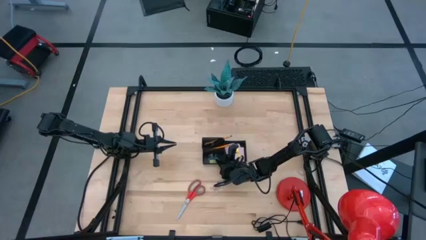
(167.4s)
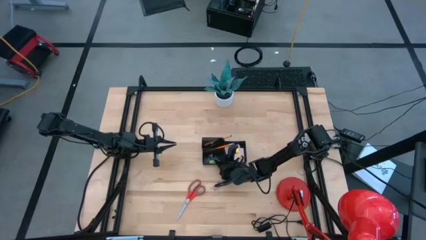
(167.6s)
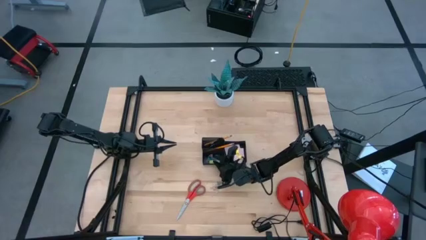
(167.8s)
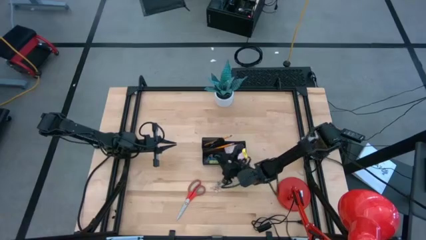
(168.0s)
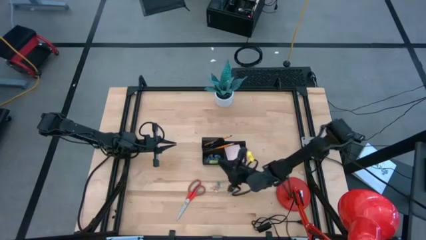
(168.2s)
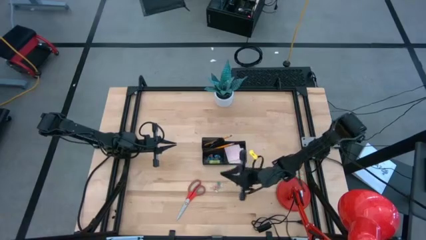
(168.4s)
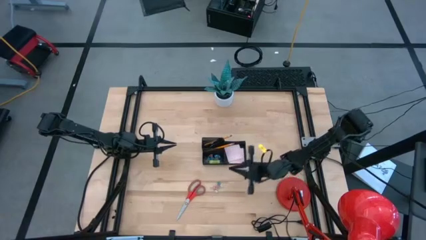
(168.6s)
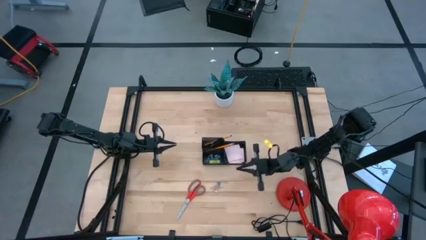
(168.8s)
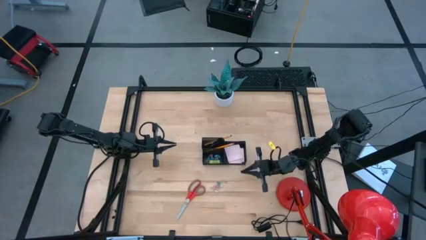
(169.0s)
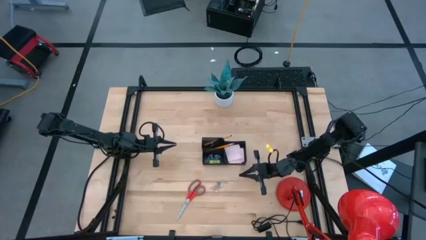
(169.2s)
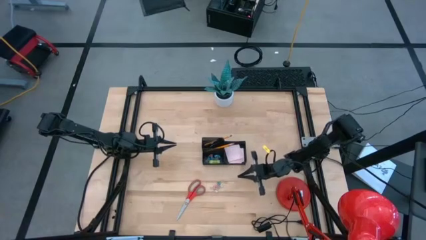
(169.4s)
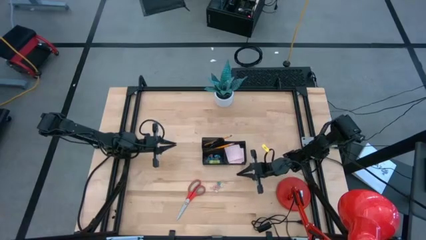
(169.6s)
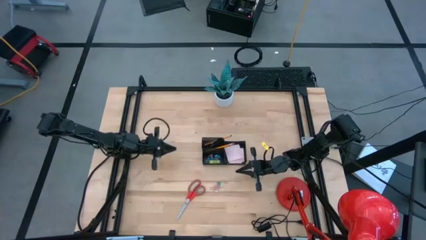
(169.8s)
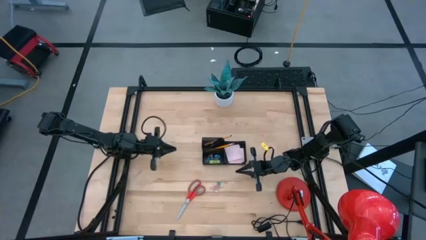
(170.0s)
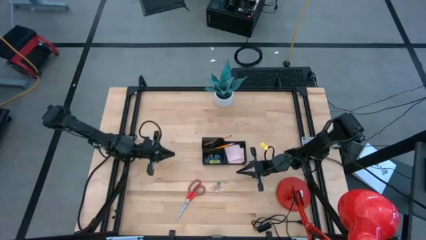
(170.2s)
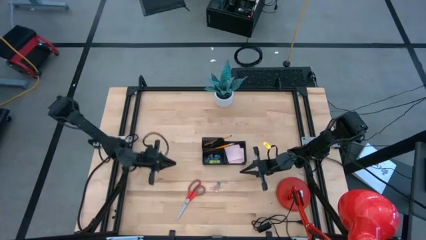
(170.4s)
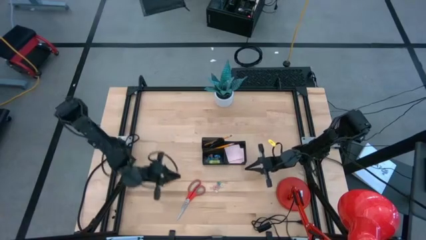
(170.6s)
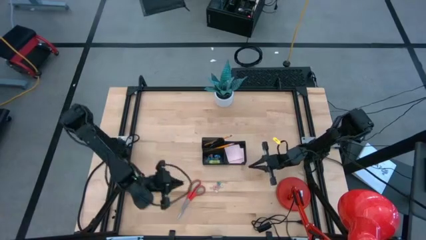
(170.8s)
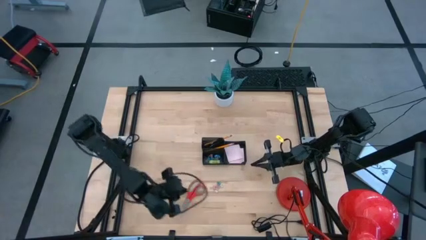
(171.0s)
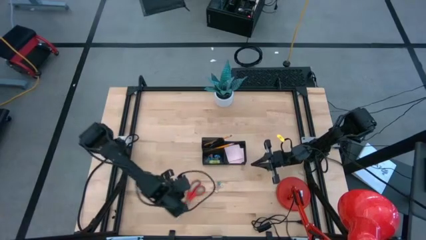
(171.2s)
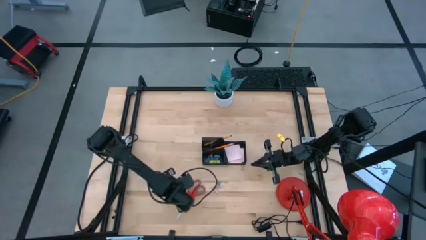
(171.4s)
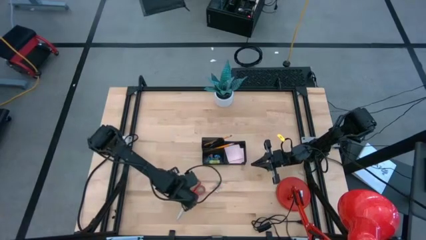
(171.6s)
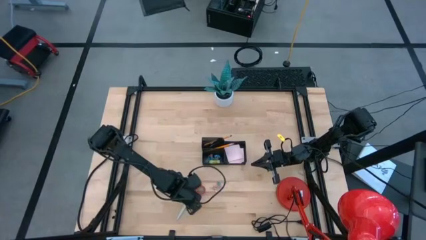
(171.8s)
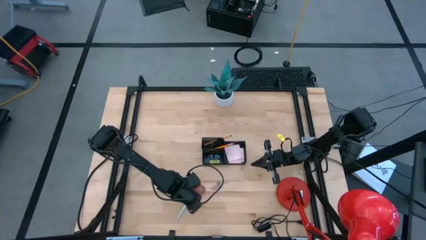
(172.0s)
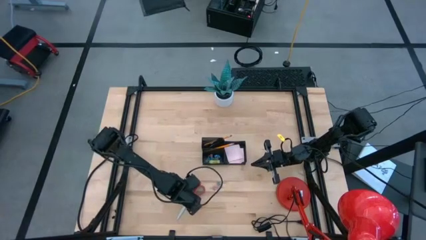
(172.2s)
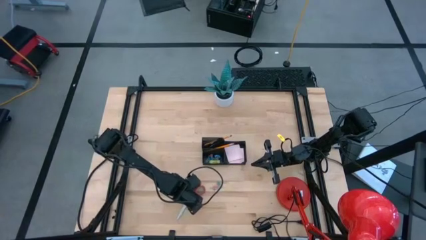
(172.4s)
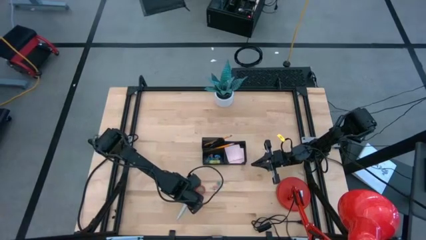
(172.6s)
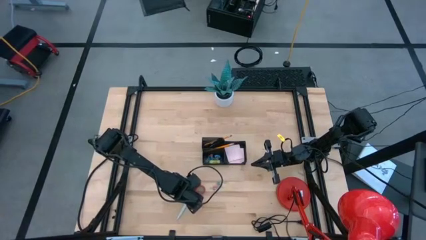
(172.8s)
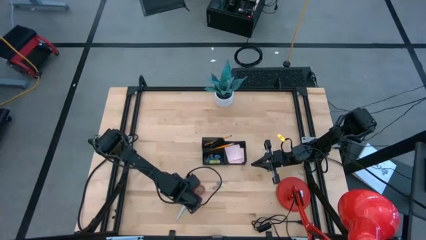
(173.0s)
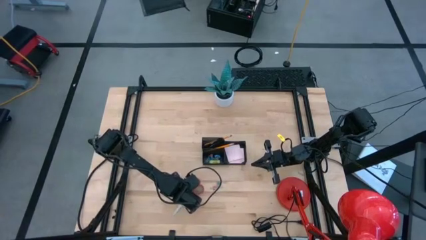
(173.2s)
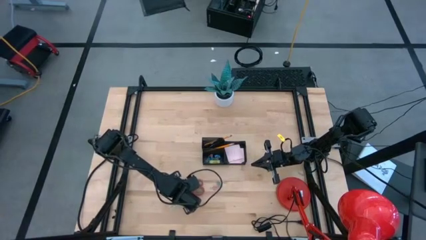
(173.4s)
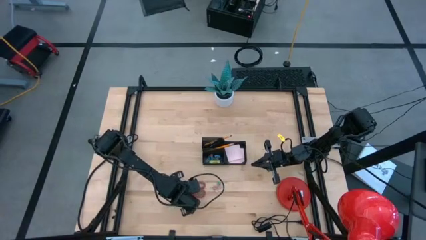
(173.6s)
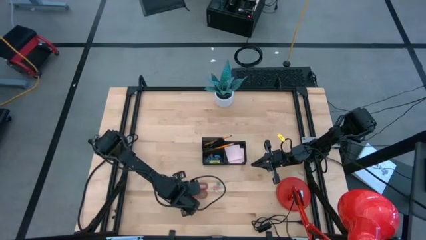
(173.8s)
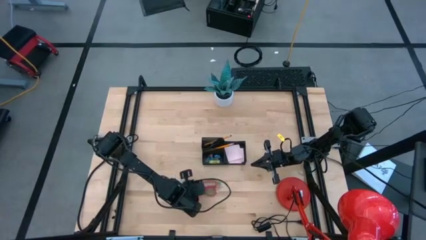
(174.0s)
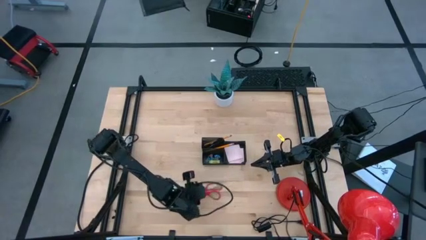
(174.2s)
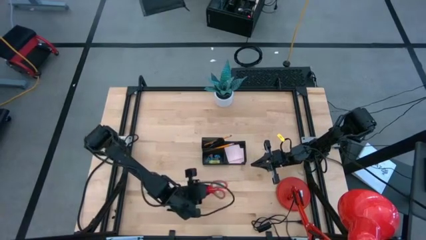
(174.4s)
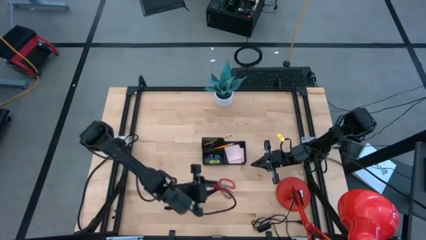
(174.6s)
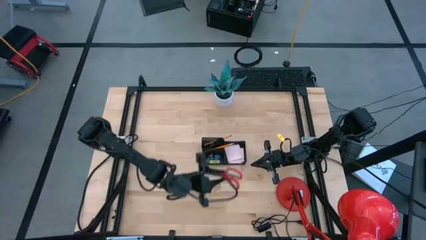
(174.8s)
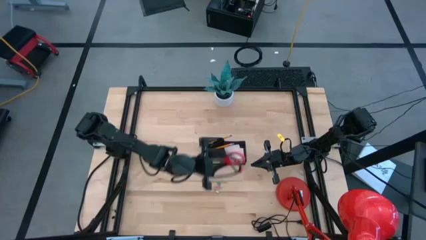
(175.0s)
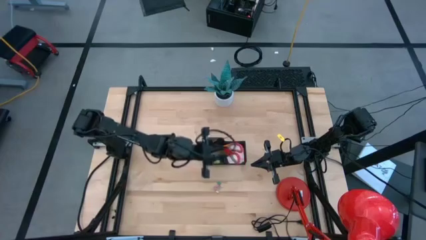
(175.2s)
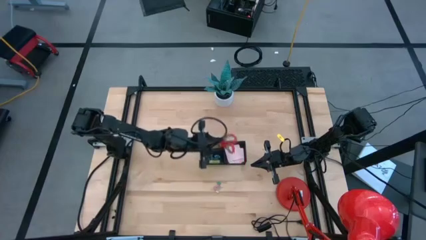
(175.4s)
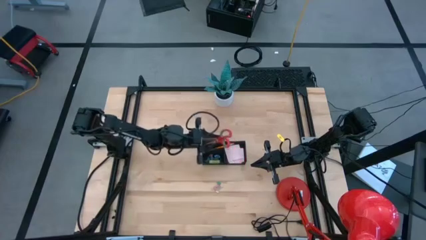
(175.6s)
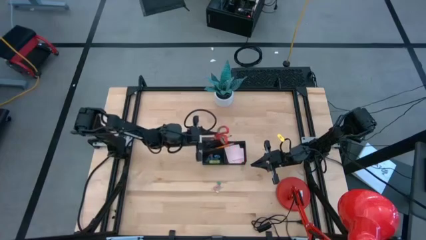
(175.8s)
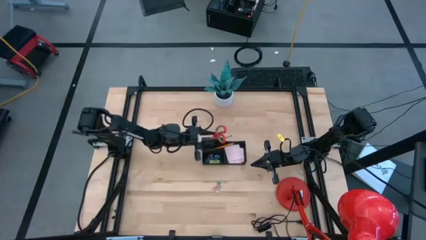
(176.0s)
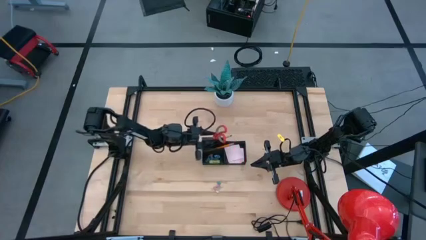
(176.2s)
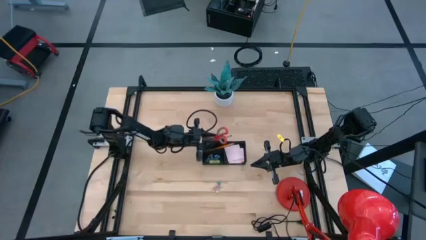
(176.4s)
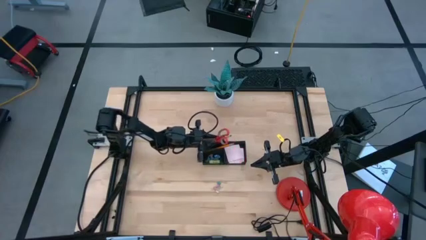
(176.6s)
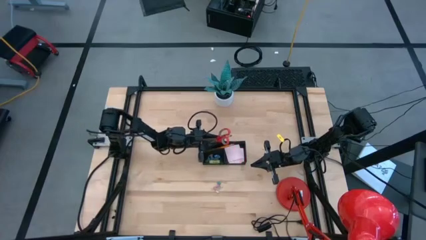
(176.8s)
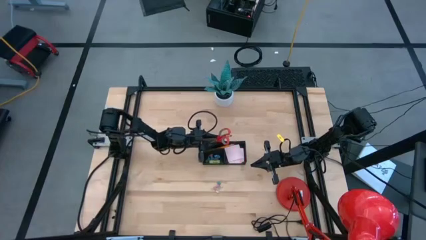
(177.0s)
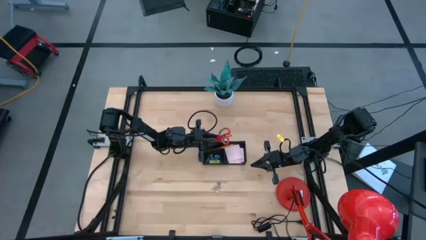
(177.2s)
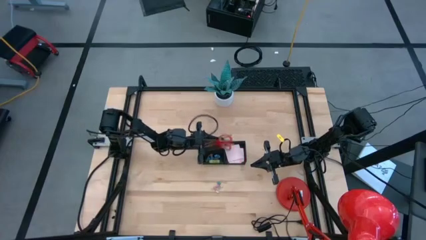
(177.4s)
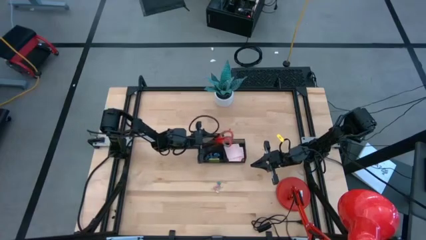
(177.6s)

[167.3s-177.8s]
Task: Pick and place office supplies into organizer
Put the scissors into the desk organizer

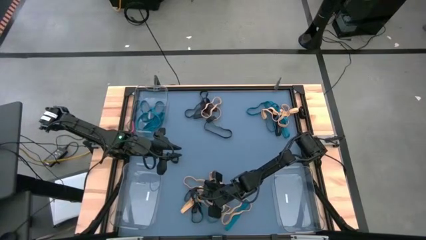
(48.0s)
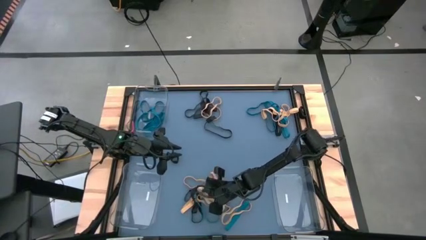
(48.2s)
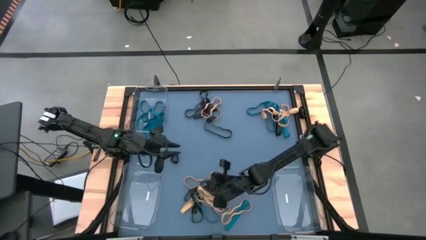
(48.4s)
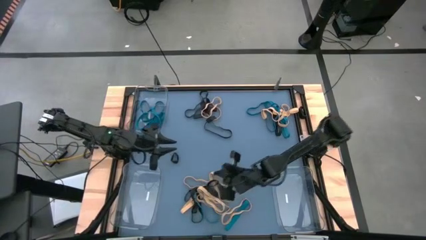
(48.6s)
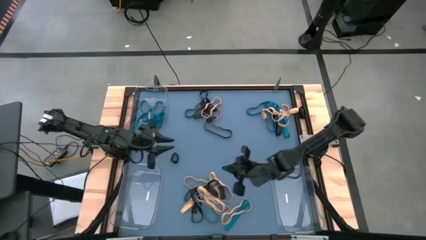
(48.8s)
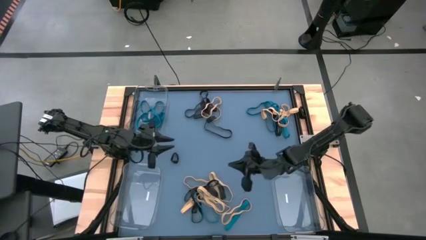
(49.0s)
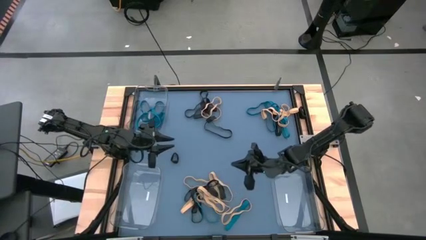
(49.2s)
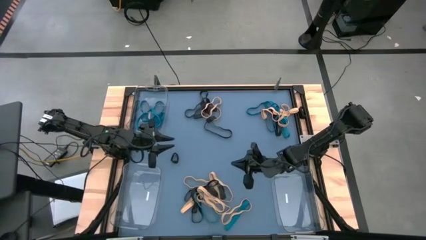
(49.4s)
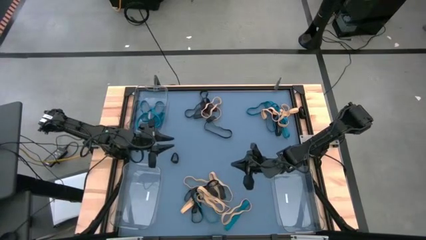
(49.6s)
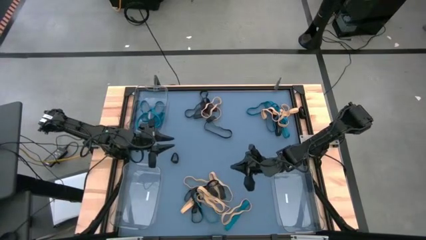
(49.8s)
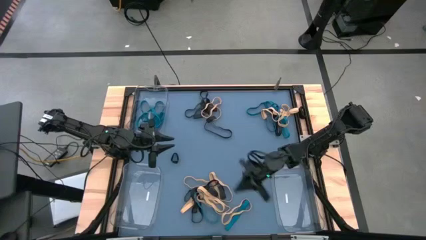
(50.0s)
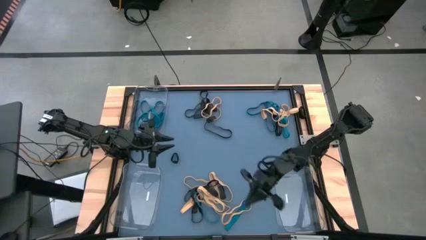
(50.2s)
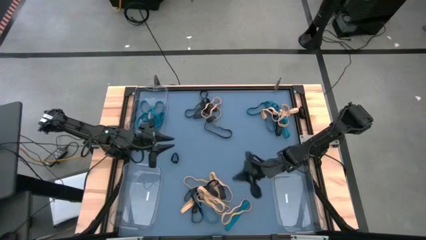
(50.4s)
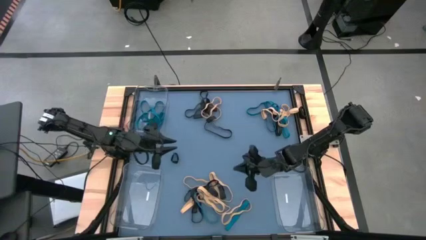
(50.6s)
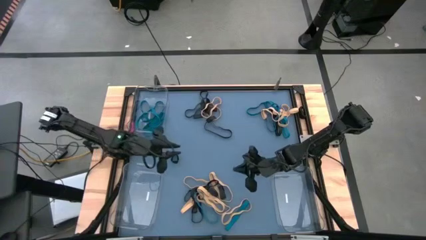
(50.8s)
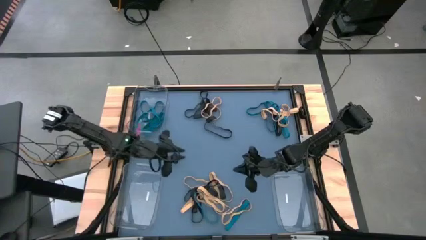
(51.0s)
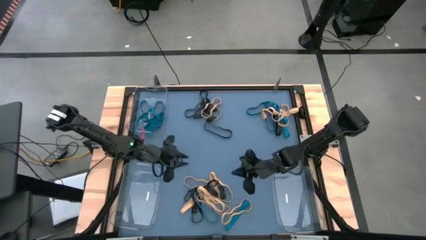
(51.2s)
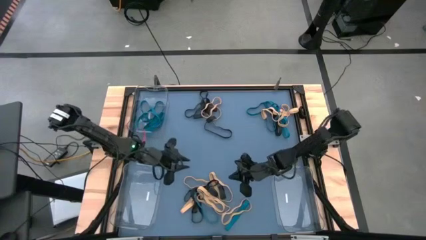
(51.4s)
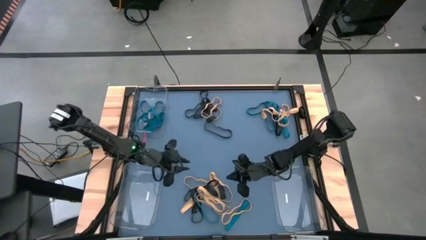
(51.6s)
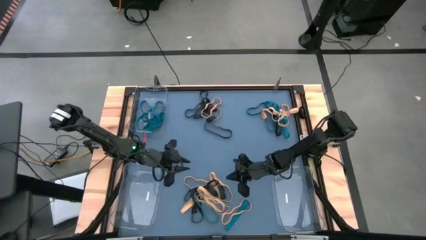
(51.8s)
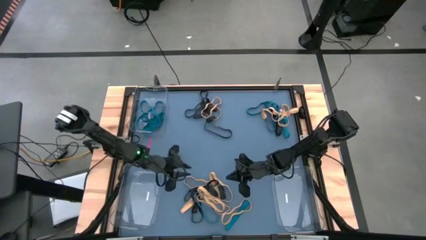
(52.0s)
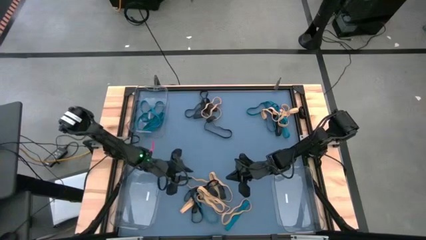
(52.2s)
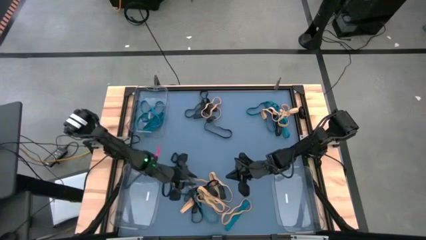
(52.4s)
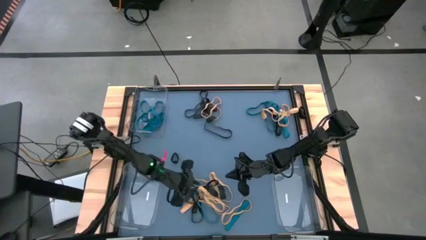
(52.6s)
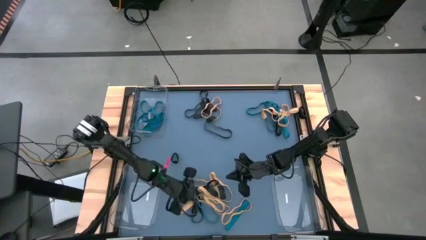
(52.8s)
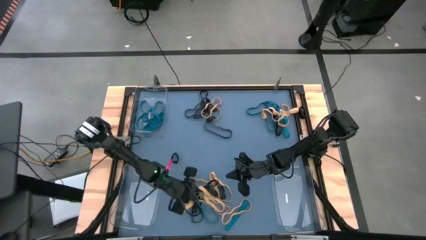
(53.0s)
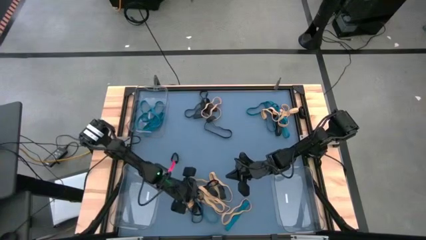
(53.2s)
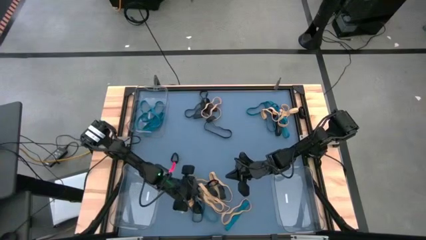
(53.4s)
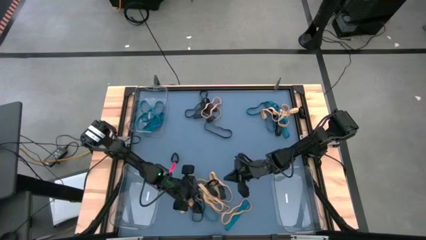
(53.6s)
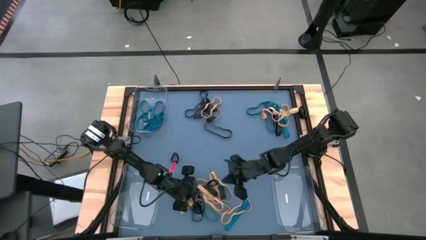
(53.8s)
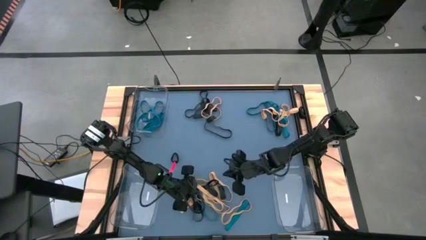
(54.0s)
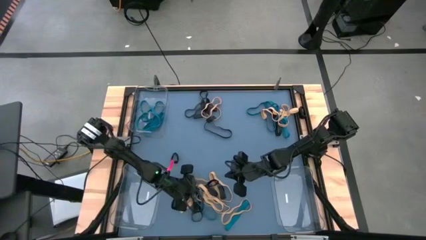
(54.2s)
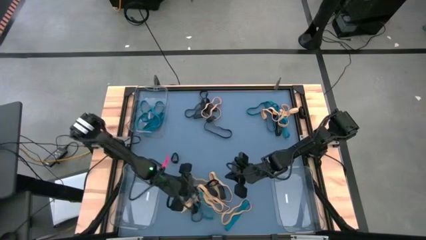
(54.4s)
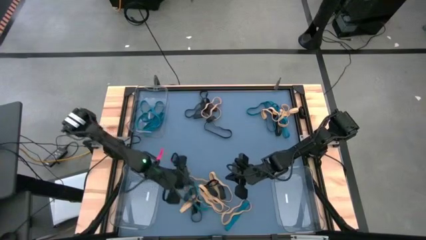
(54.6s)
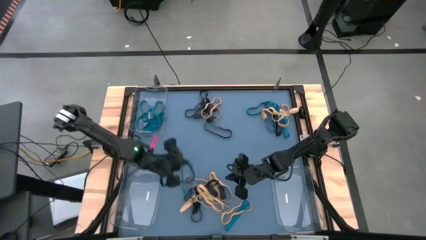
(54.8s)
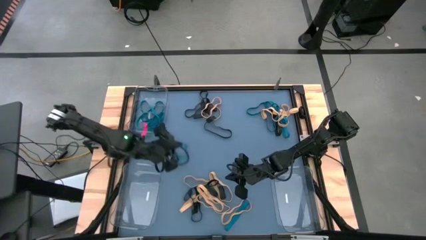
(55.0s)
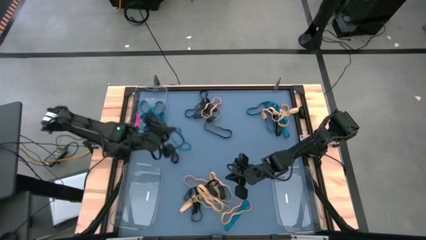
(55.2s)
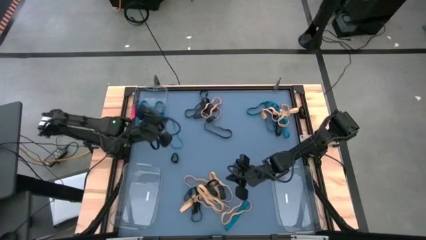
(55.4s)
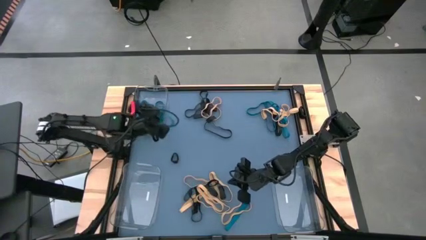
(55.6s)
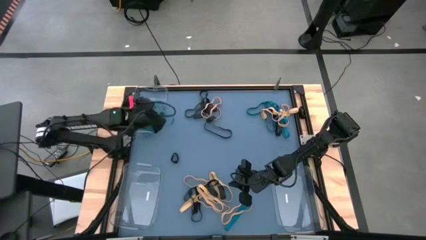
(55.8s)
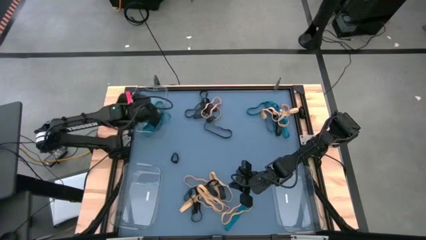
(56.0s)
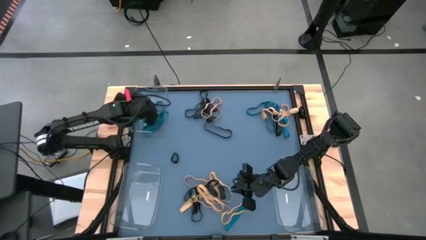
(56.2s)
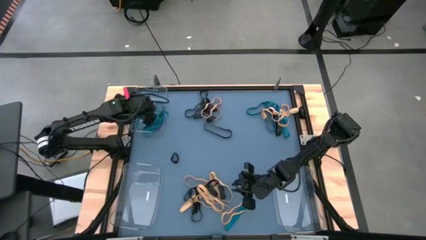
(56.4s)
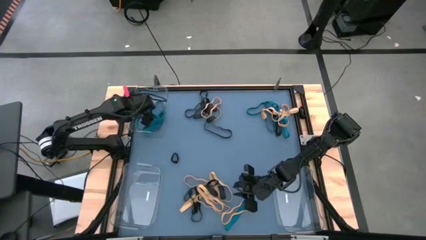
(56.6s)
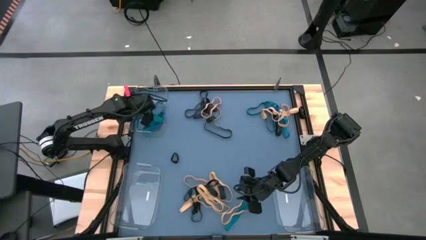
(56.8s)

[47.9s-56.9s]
Task: Sort rubber bands into baskets
Put the blue rubber band into the top transparent bin
